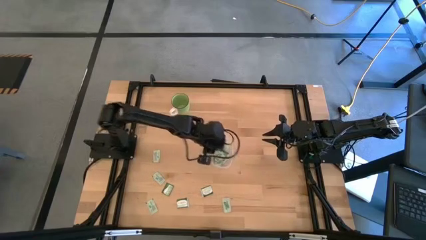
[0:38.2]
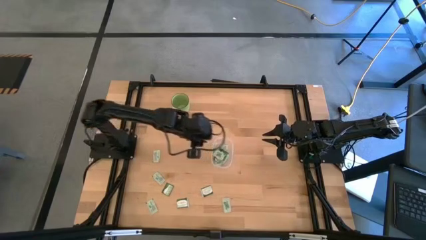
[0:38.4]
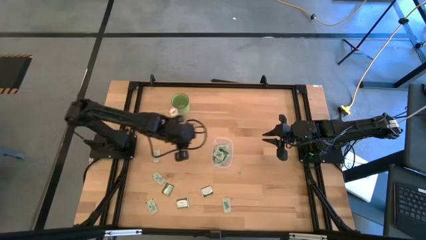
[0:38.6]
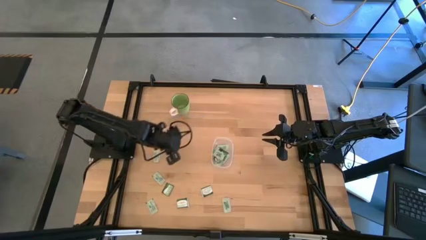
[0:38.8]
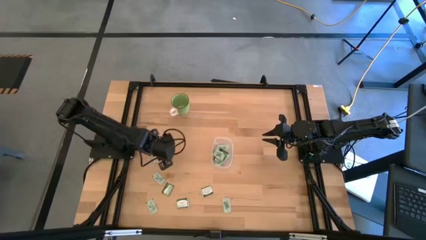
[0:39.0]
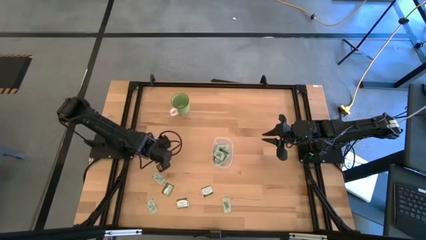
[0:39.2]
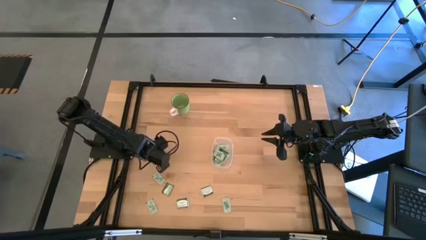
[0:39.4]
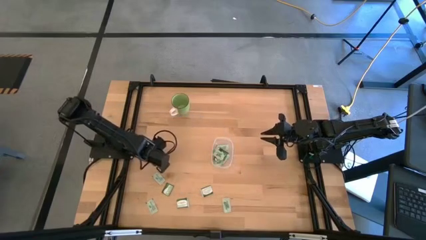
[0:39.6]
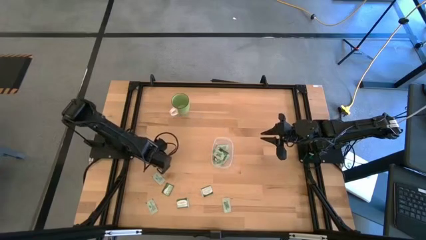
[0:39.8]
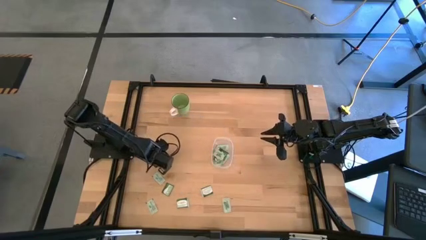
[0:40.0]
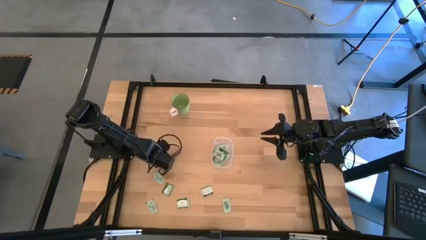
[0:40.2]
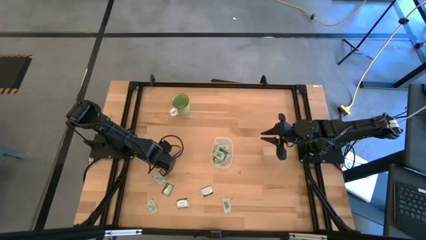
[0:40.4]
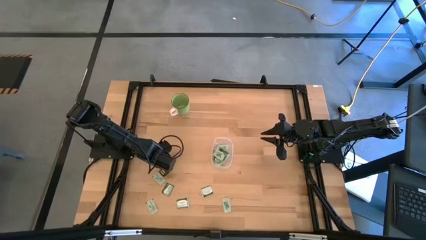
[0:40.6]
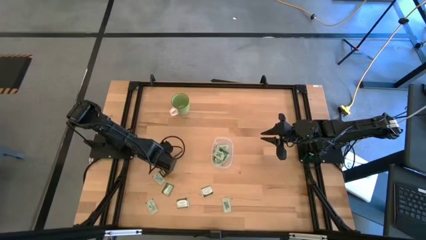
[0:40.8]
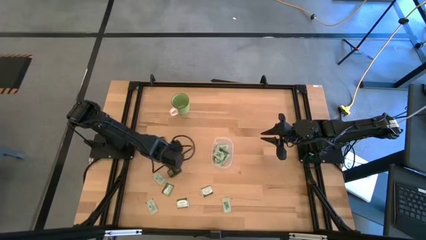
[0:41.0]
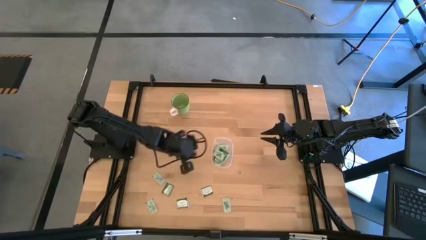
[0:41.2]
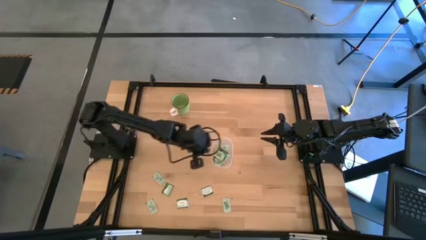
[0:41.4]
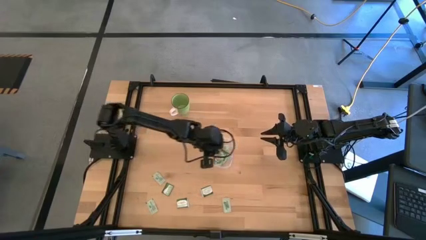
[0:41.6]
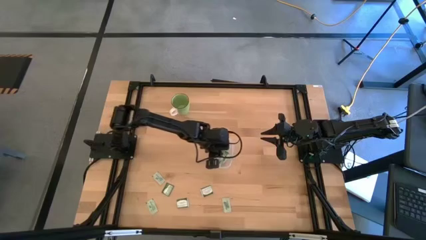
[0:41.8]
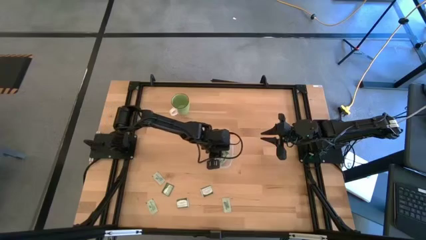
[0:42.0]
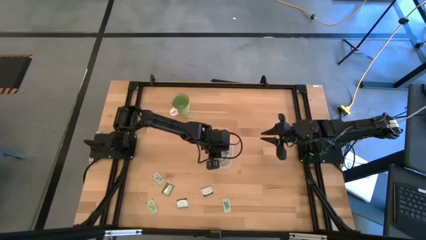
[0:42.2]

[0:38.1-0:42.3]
Task: Pick and place items into bin
Put the stevia packet into the transparent bin

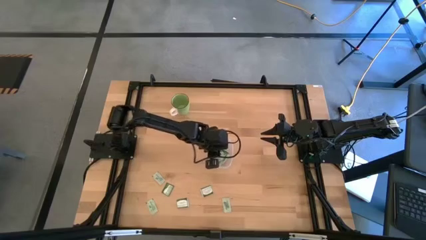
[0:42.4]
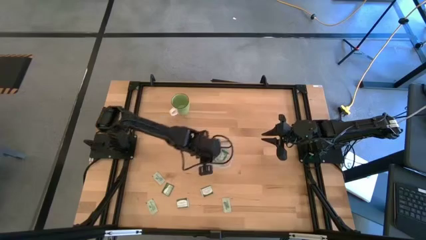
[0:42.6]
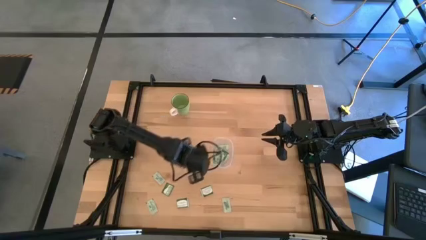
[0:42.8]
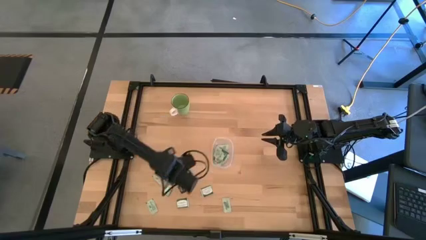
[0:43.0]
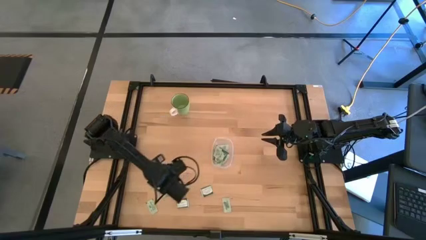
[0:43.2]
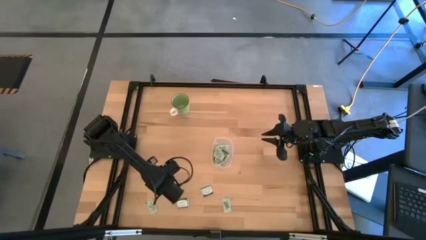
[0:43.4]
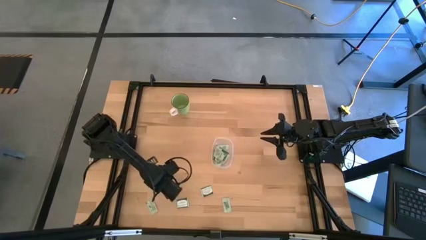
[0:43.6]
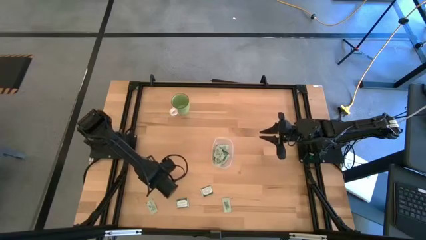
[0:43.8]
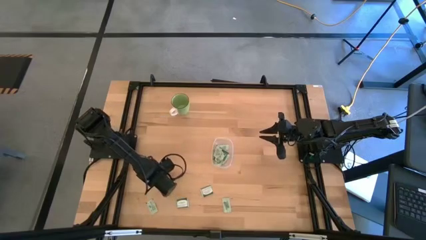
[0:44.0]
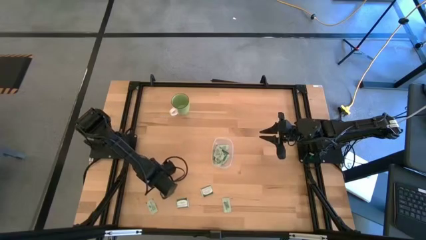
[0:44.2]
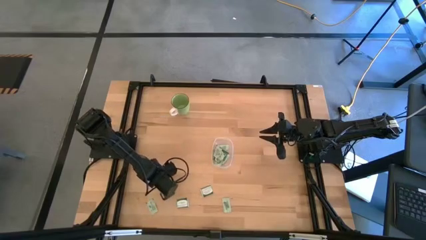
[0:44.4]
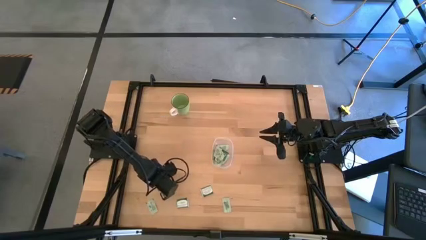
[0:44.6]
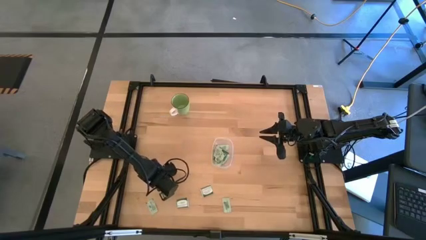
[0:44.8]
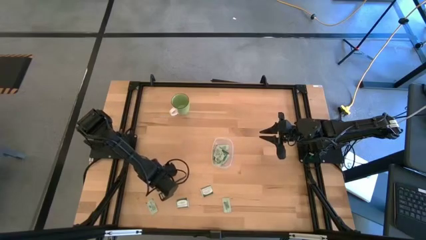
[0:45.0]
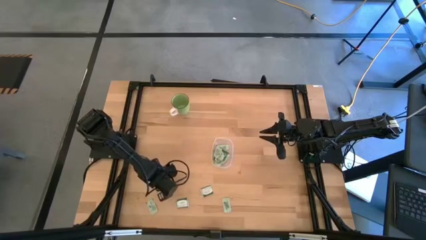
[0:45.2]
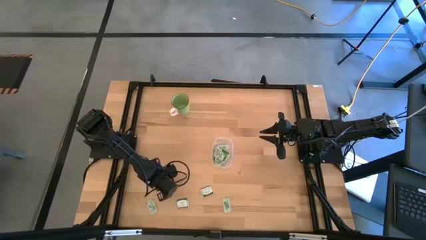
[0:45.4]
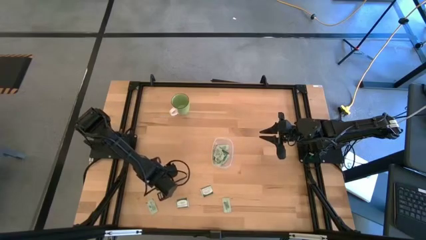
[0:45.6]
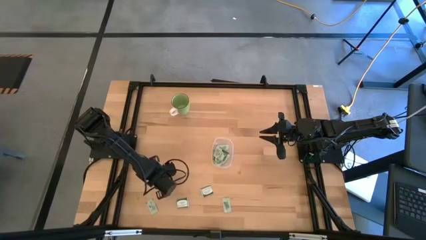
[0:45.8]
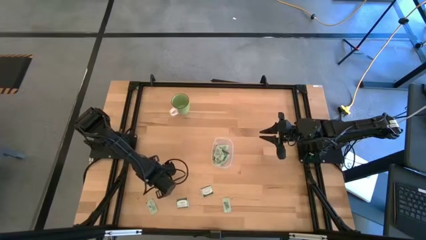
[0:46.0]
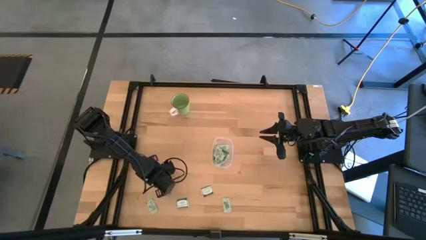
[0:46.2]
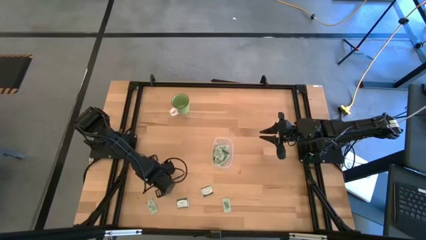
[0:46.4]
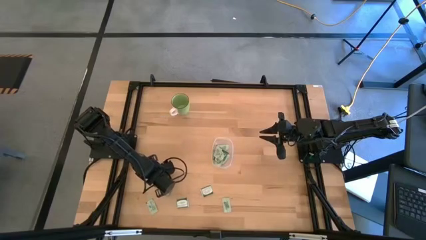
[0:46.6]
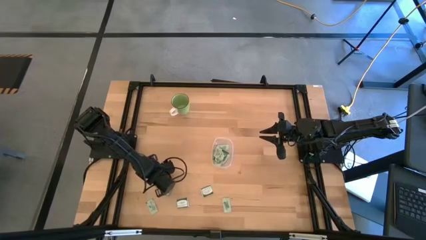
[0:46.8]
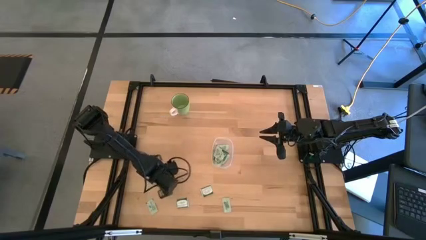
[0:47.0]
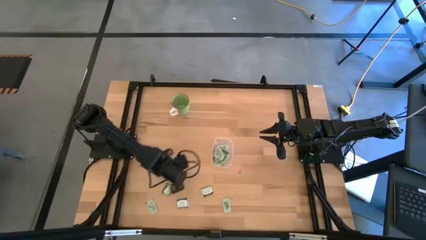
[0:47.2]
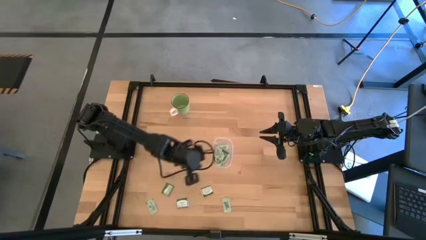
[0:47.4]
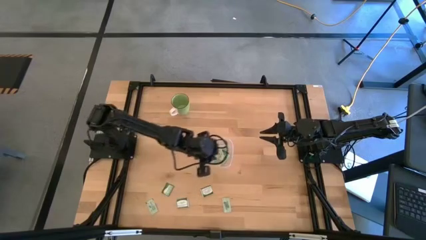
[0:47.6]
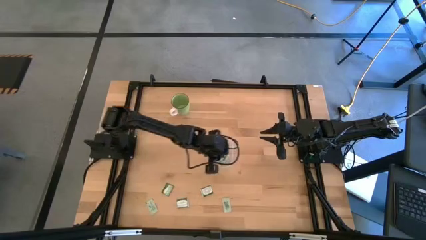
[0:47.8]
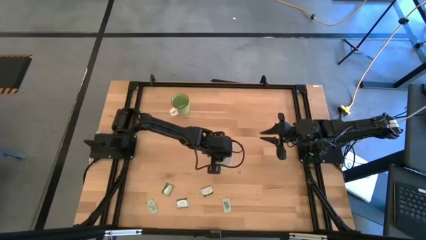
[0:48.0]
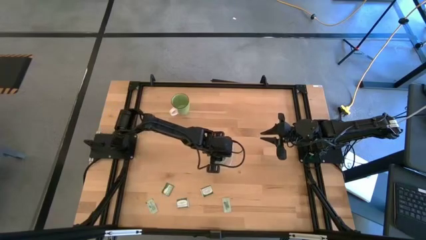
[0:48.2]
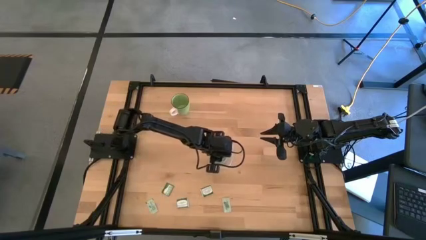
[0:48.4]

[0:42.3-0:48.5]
Put the stevia packet into the transparent bin

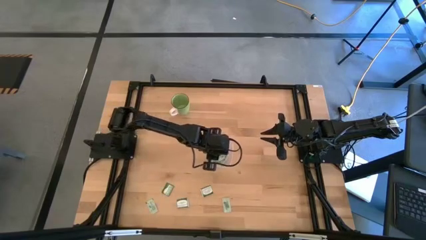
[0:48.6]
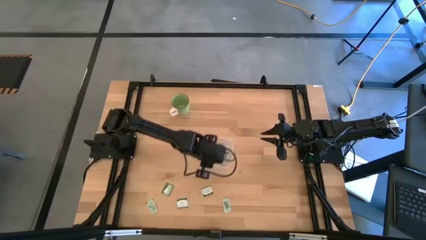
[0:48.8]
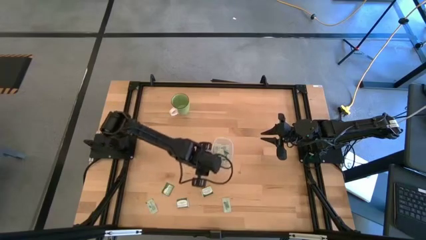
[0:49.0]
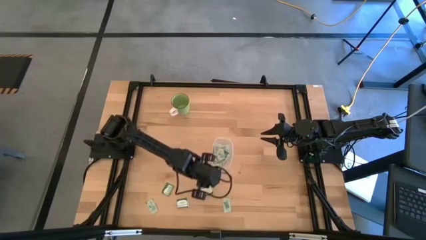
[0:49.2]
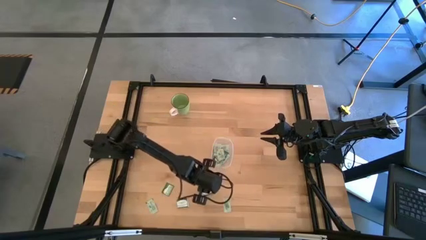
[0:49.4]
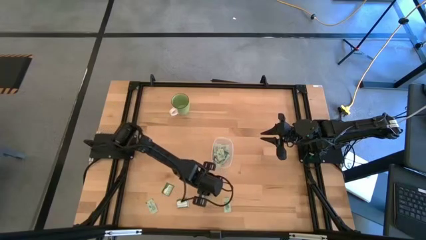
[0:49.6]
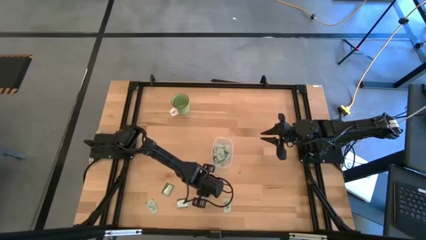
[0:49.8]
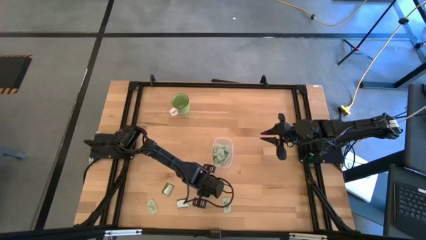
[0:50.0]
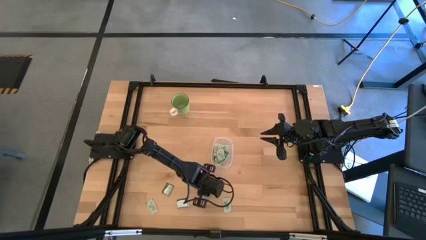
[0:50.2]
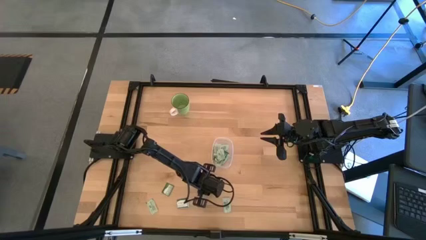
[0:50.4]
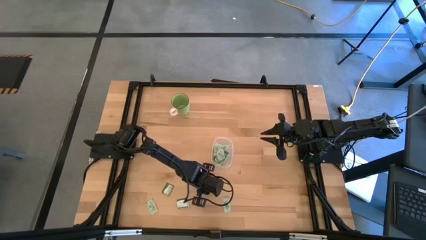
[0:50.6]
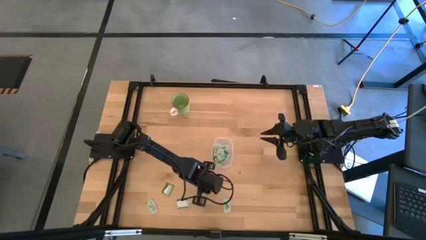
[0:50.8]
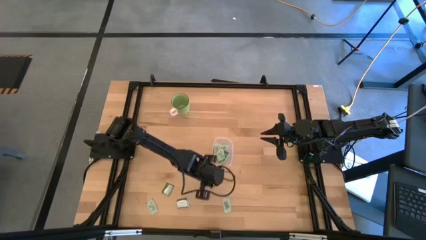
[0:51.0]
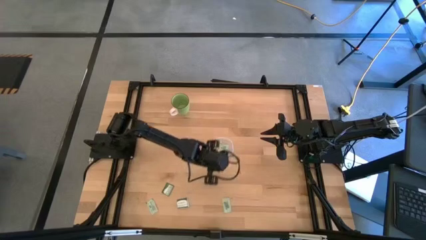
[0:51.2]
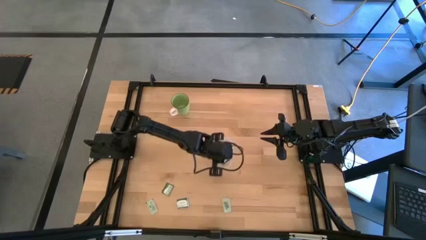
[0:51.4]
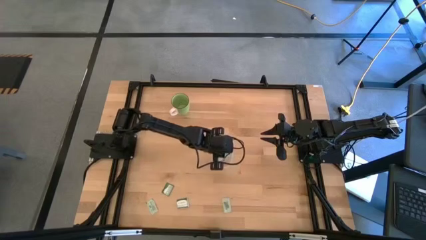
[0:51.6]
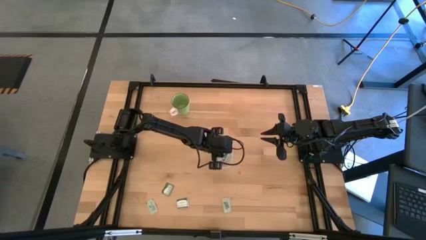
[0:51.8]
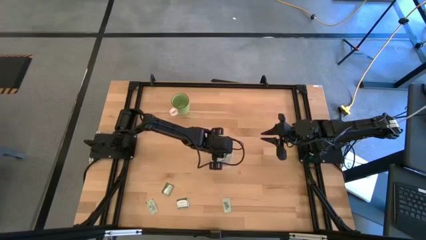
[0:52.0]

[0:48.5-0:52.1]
Put the stevia packet into the transparent bin

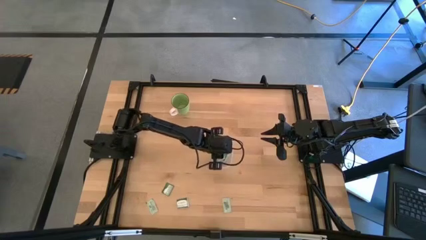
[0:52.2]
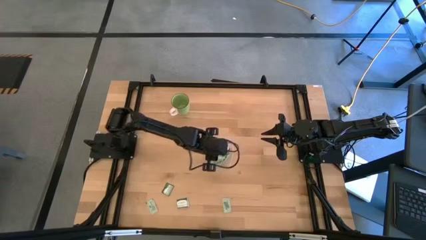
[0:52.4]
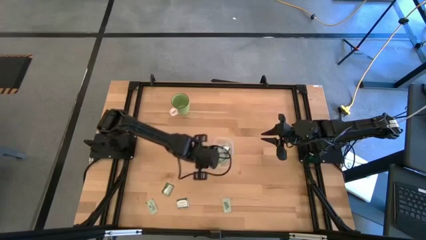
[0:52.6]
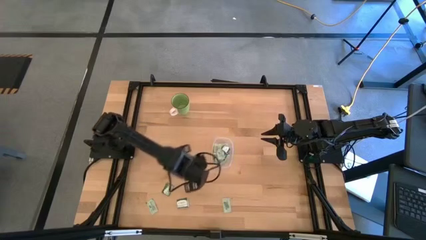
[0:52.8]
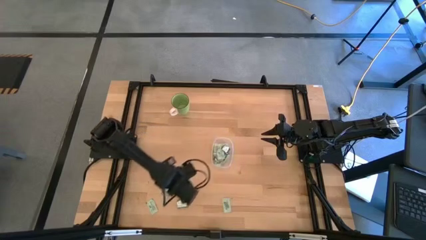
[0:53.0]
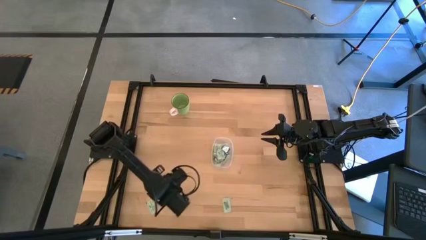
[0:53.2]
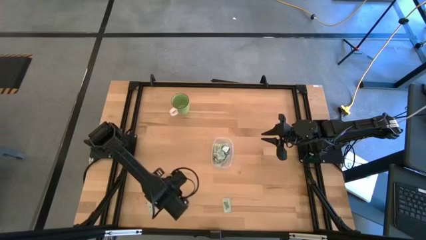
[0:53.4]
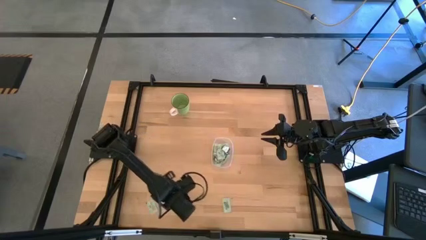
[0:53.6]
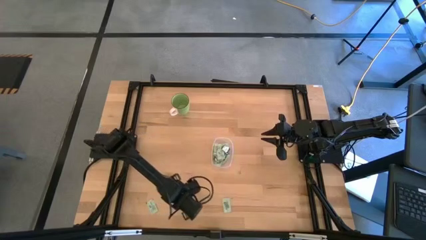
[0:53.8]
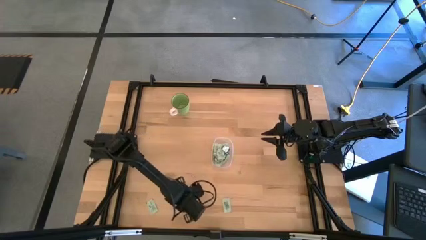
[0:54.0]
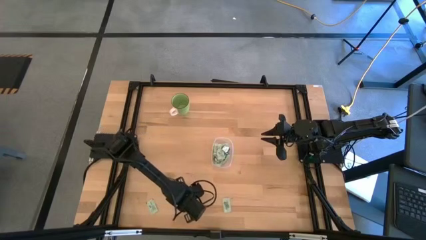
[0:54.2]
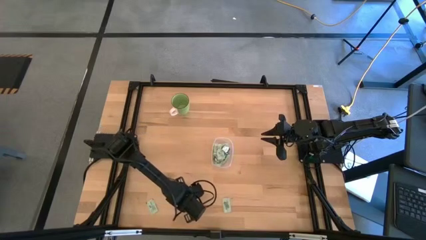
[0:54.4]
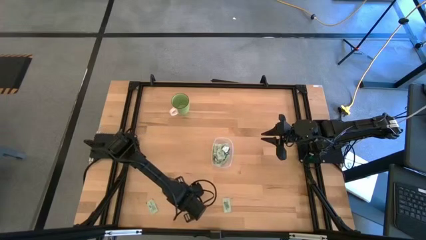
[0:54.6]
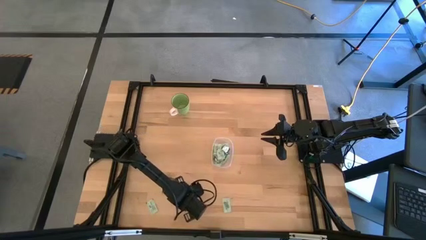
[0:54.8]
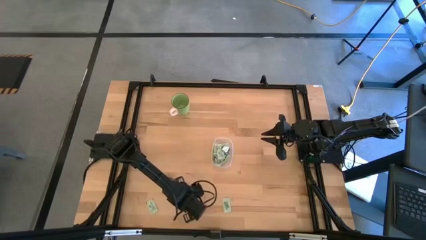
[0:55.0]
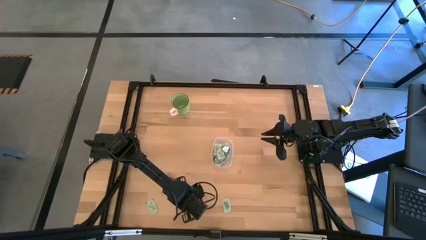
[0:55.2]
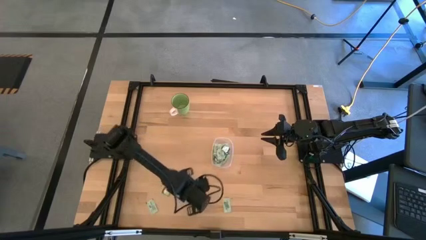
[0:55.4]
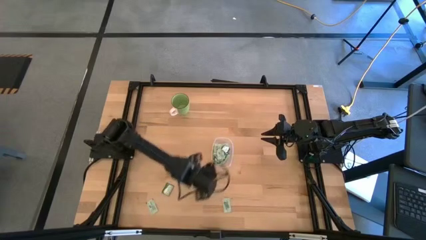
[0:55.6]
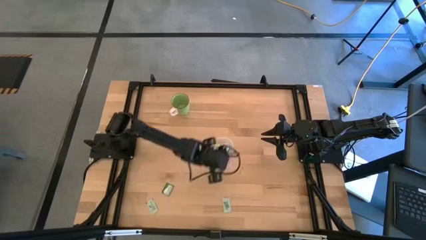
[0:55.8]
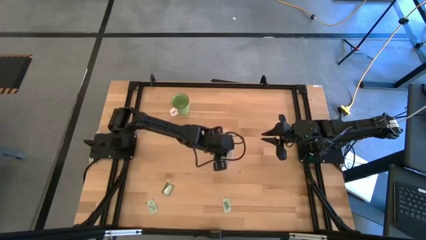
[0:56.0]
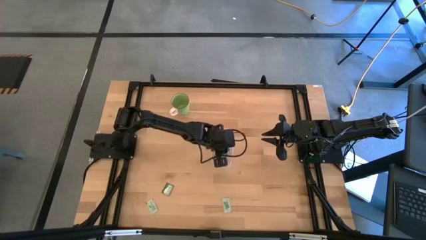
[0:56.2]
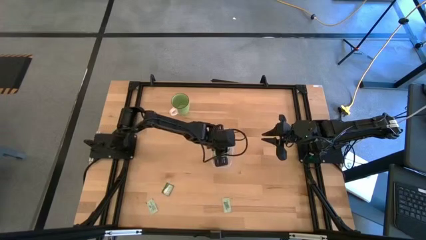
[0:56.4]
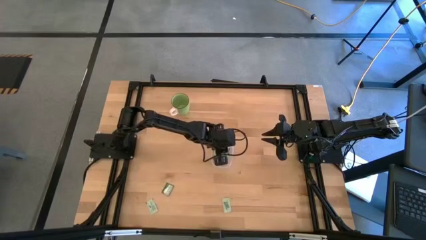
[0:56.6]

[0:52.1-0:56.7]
Put the stevia packet into the transparent bin
